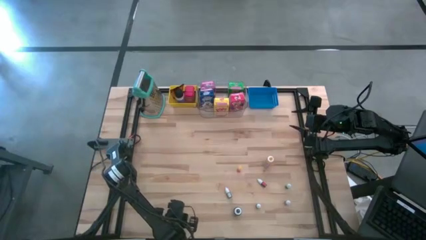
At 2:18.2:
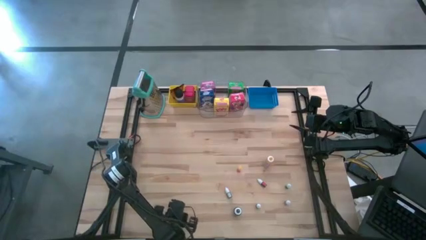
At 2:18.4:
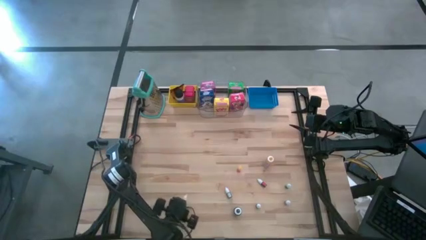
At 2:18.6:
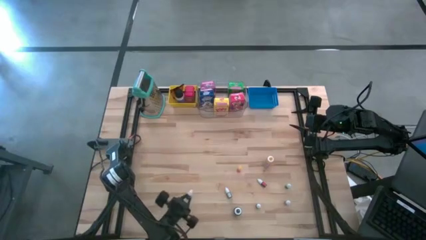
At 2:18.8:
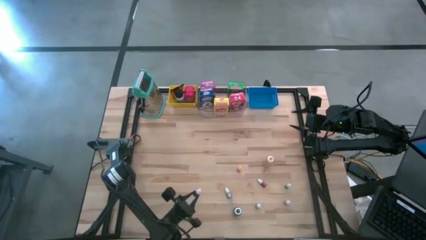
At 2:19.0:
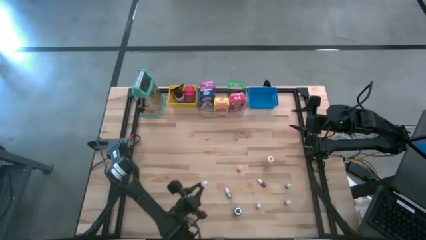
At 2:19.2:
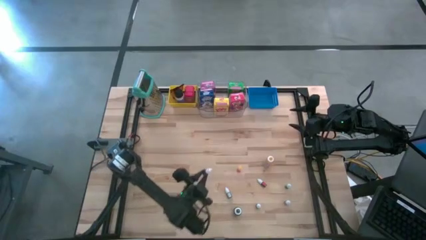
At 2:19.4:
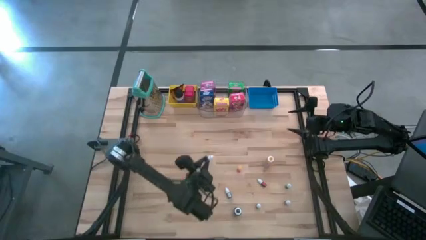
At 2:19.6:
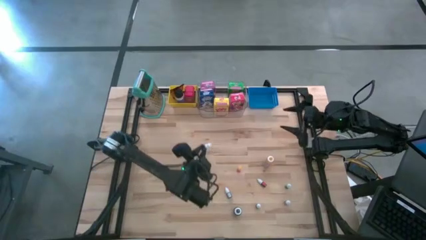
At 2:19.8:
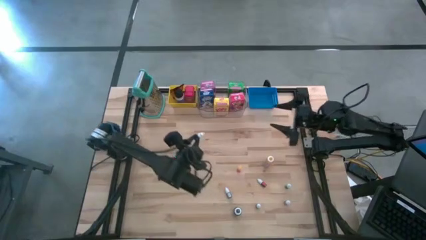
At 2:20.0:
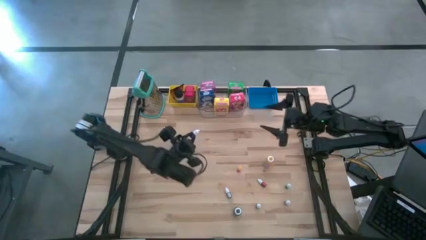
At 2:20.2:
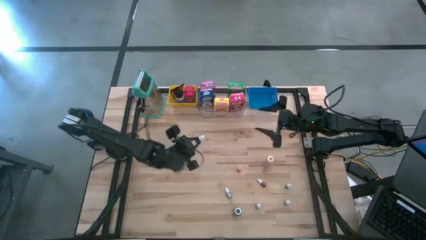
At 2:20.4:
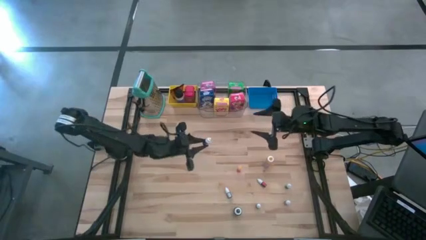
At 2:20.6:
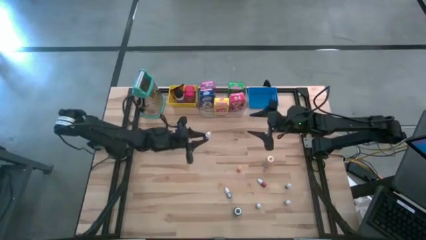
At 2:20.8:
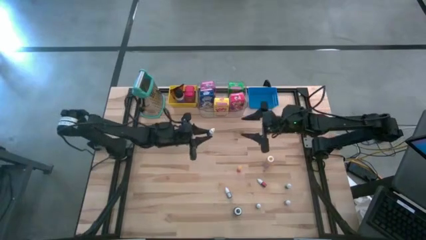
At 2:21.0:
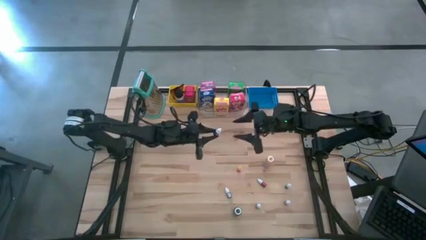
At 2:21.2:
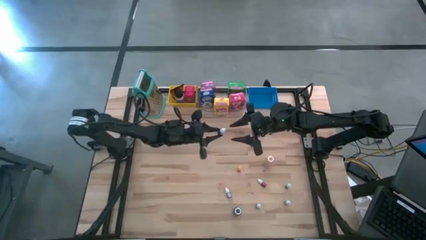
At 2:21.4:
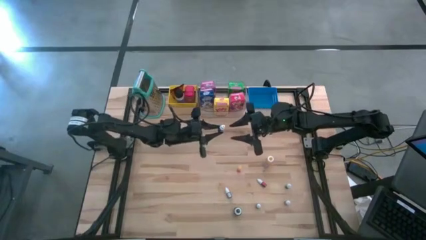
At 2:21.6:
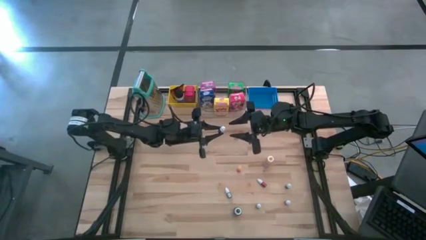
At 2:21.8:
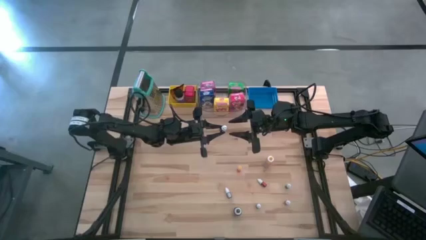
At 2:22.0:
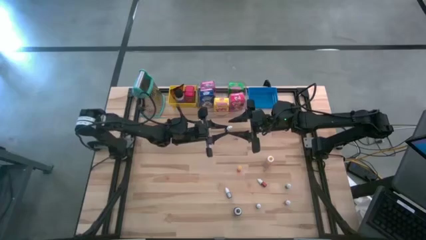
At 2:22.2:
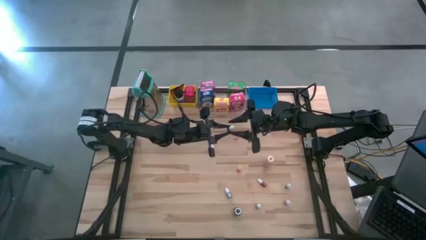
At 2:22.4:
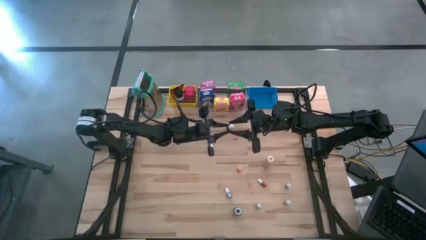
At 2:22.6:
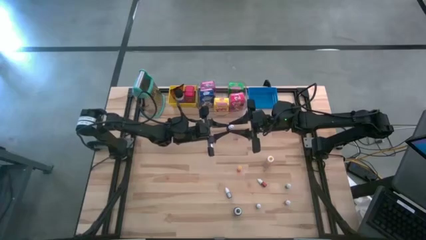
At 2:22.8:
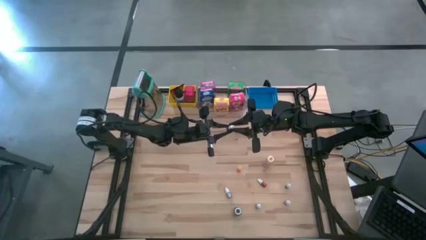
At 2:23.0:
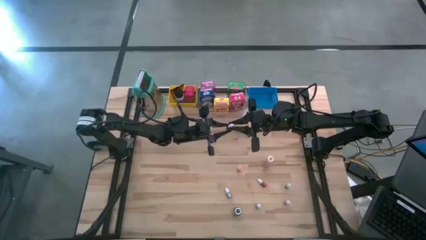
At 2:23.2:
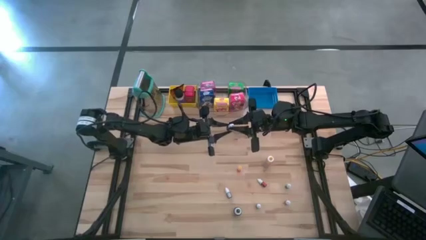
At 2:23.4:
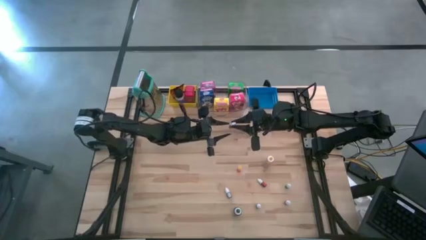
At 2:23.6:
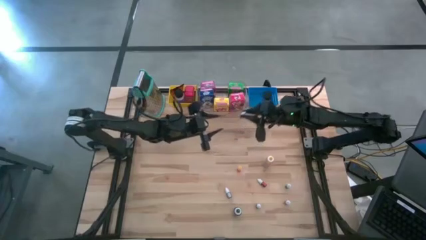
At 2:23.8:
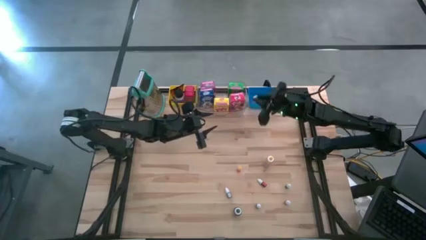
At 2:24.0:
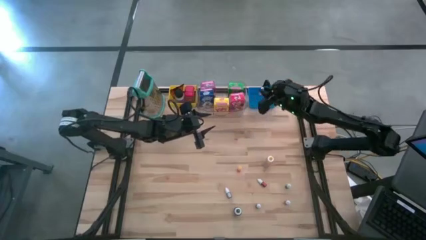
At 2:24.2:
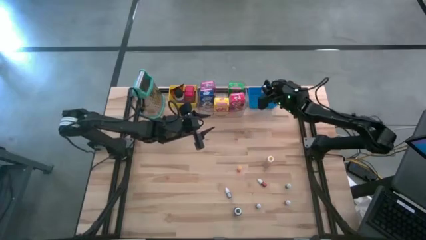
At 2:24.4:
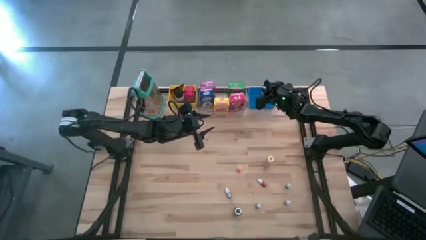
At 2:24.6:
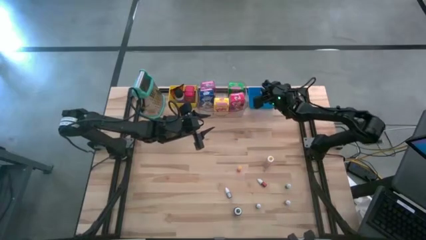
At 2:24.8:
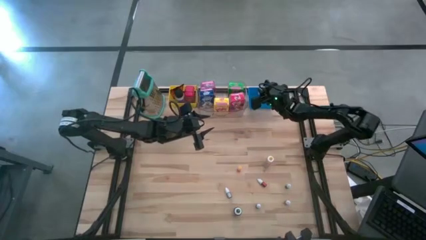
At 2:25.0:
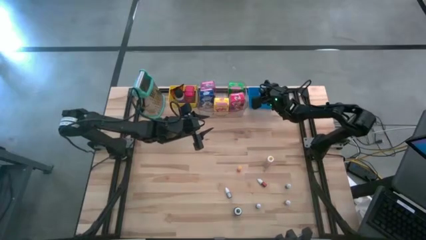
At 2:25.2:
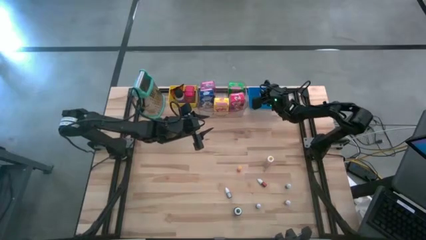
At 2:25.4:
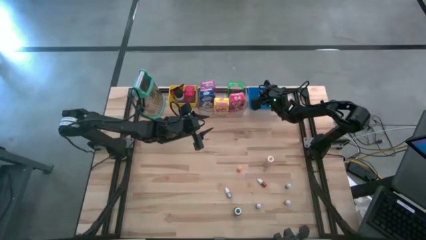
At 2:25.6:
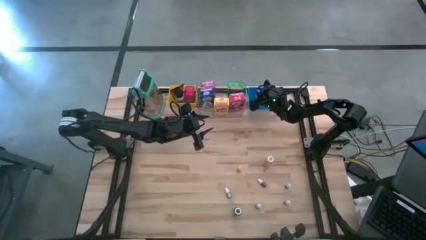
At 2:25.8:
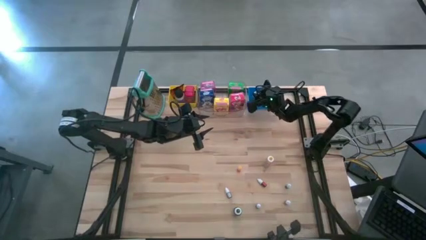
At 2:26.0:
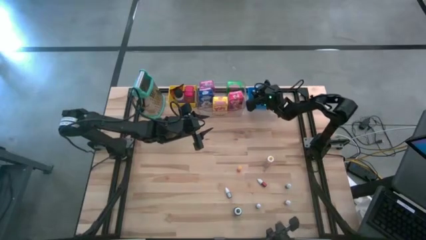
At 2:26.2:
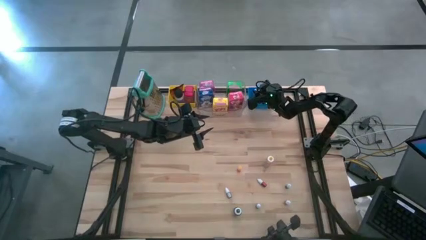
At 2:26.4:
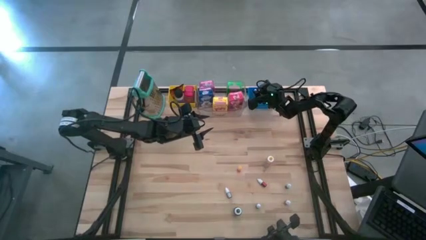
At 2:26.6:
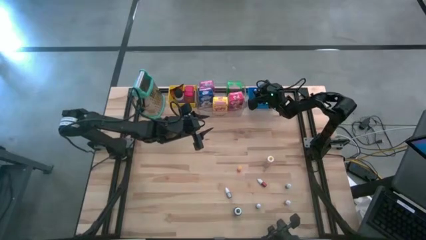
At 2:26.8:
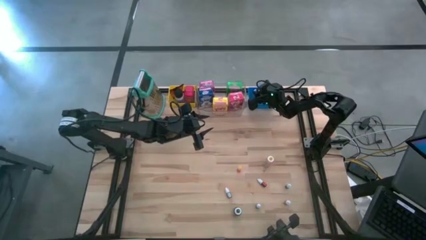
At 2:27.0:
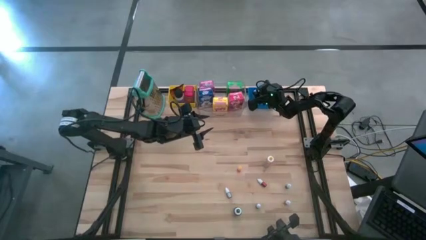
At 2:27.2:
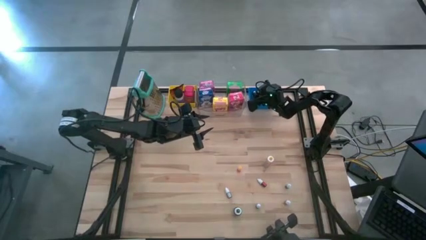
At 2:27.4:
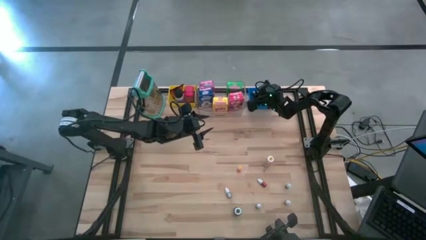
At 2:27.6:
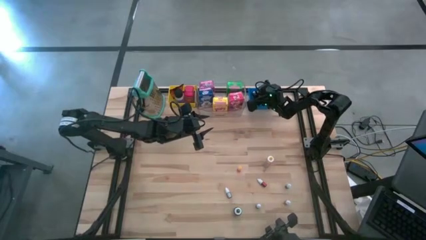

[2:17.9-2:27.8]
Task: Pick & Place Kitchen Items
Put the left purple bottle into the blue bin

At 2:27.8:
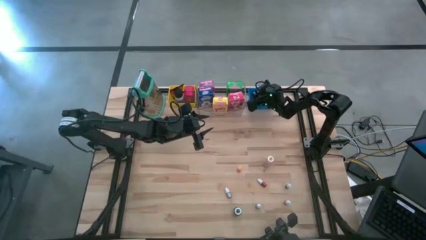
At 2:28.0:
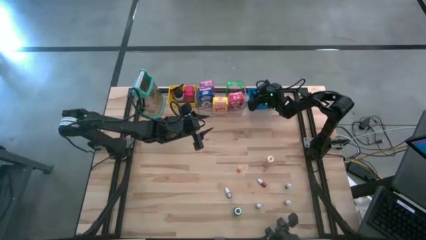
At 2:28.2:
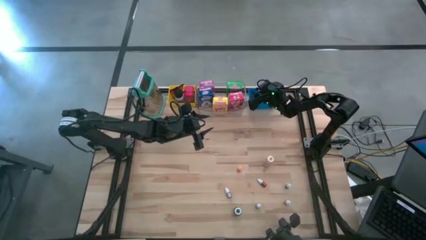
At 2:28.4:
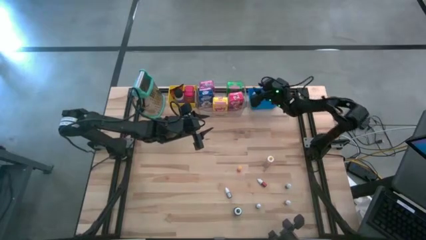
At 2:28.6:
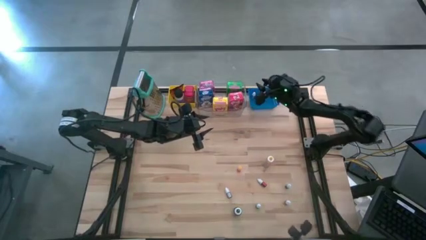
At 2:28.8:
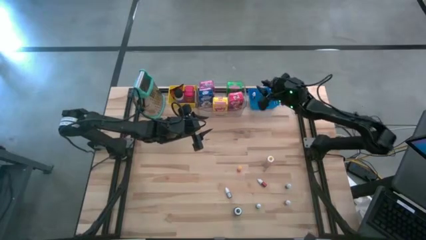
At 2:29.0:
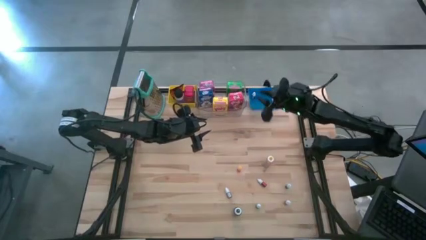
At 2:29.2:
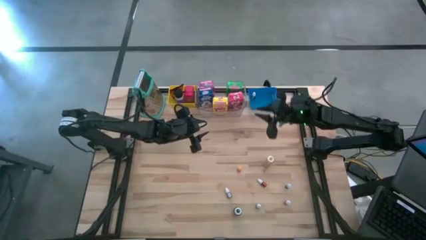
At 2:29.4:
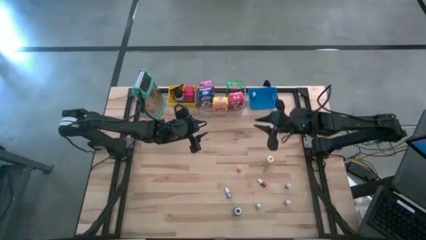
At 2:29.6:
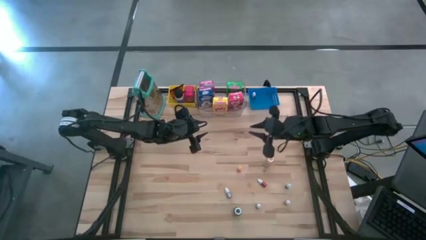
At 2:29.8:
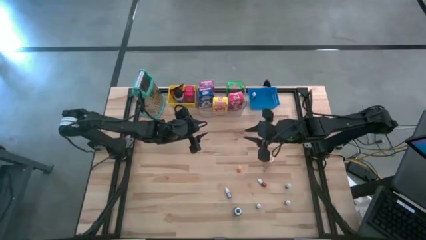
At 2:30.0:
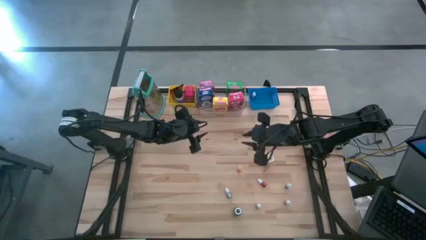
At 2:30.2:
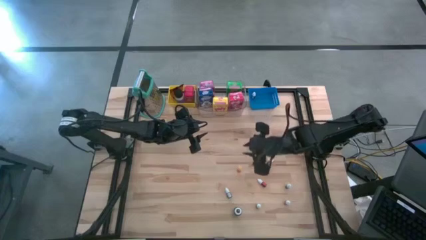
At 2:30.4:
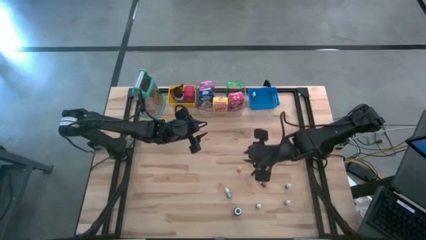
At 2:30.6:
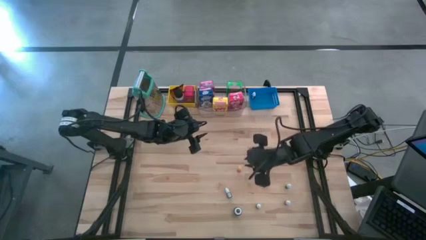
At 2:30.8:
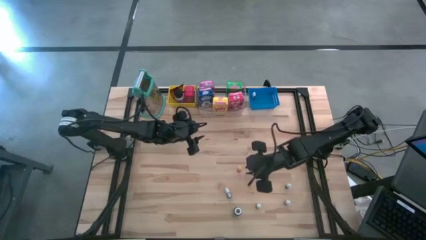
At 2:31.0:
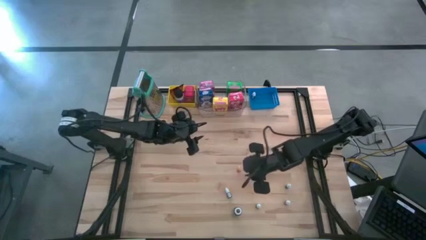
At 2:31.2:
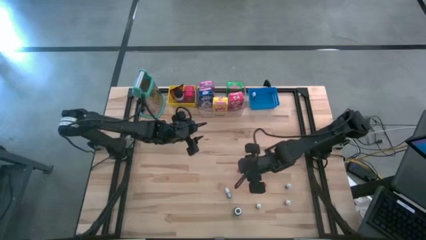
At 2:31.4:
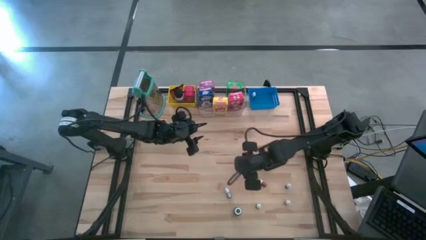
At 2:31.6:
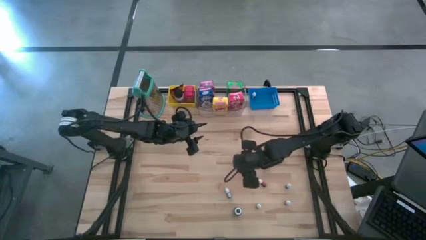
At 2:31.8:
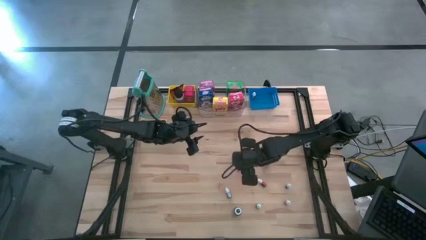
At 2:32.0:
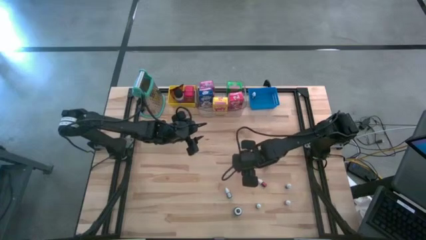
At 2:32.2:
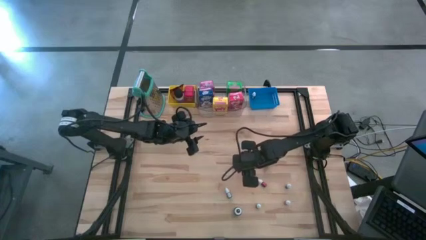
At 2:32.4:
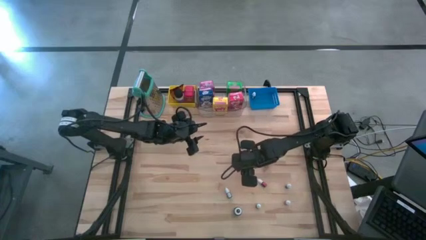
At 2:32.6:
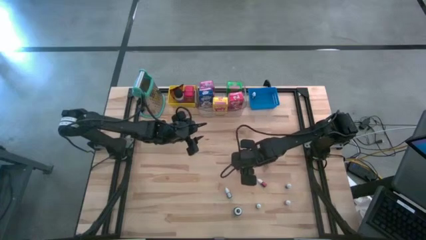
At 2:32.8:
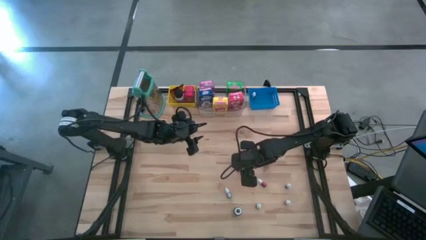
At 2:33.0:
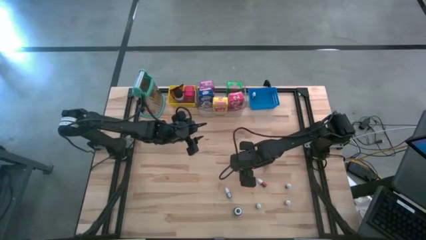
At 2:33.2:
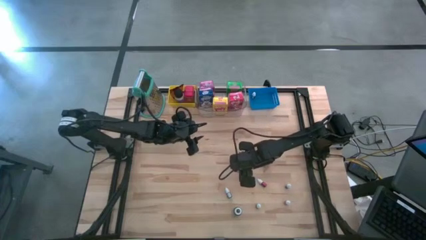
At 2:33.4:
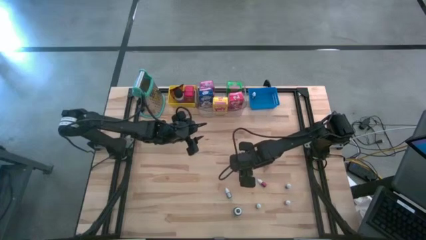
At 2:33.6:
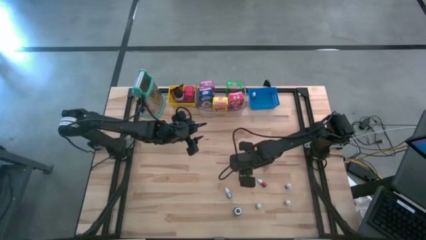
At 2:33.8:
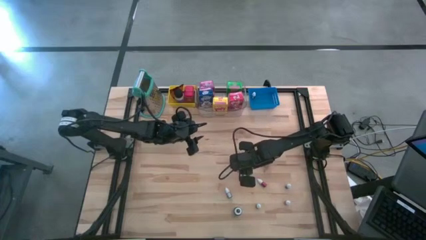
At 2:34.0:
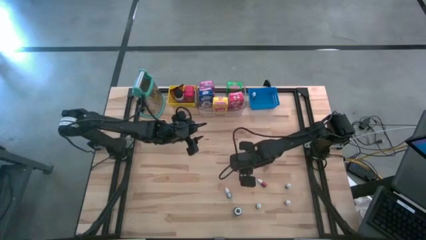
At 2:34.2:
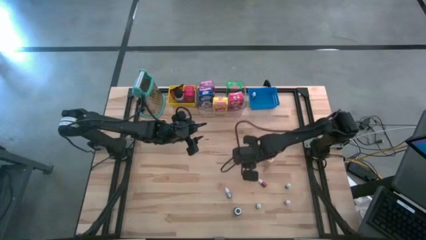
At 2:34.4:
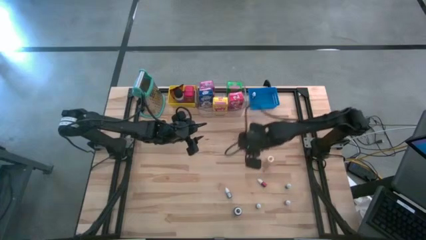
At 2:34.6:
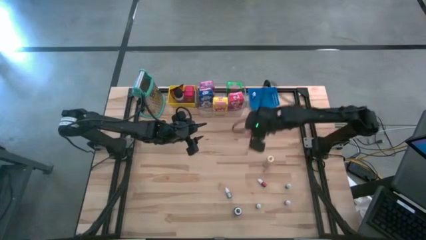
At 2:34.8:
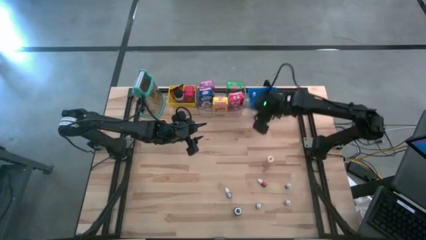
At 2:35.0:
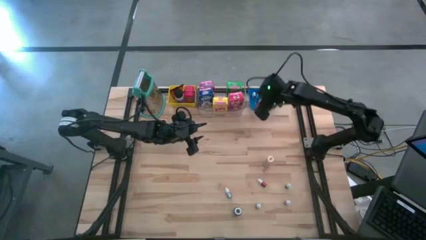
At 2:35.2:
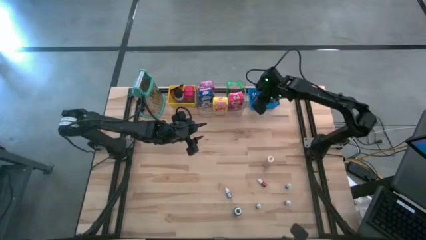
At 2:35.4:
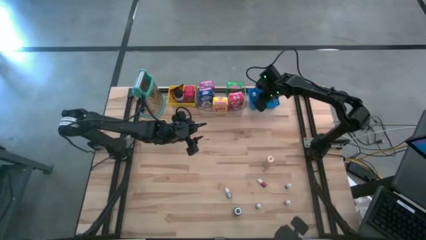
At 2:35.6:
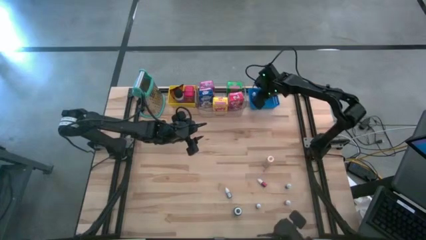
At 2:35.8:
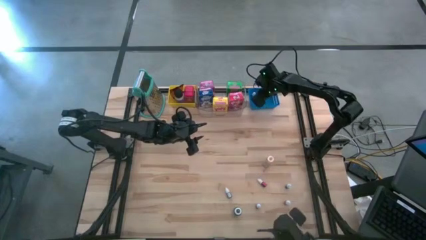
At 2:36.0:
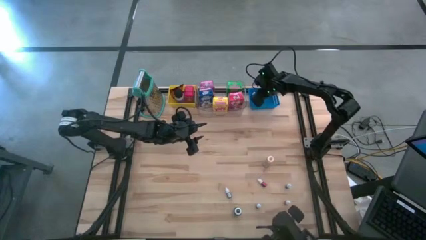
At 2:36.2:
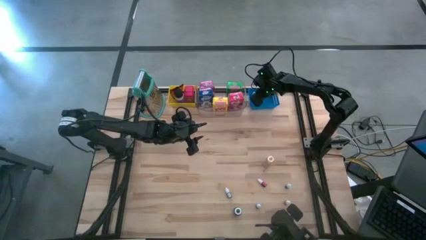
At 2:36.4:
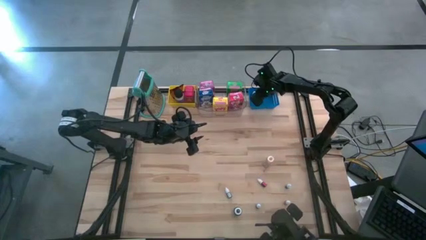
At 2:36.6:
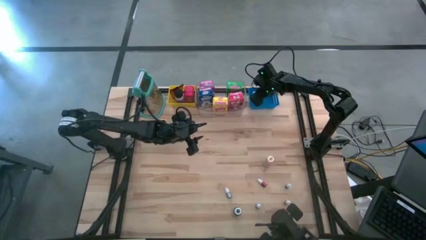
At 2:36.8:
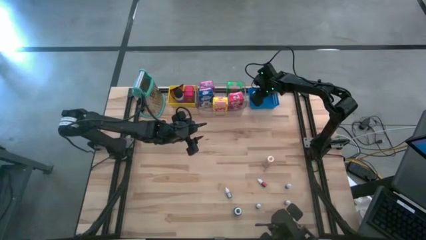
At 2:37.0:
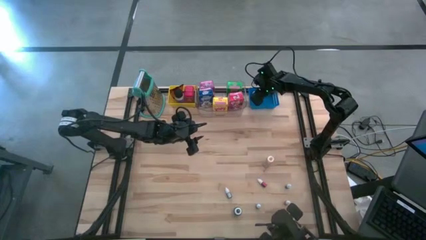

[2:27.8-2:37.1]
Put the orange bottle into the blue bin
